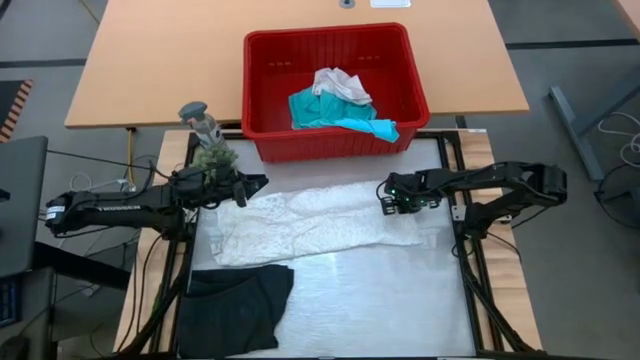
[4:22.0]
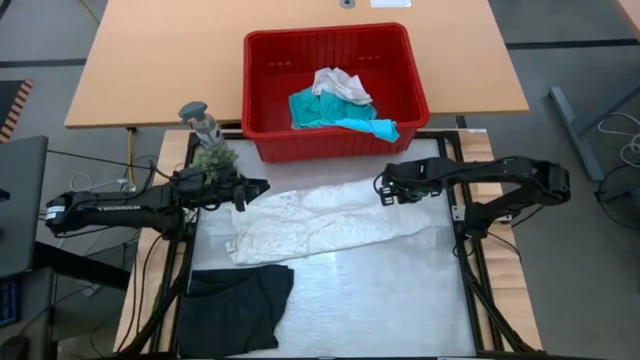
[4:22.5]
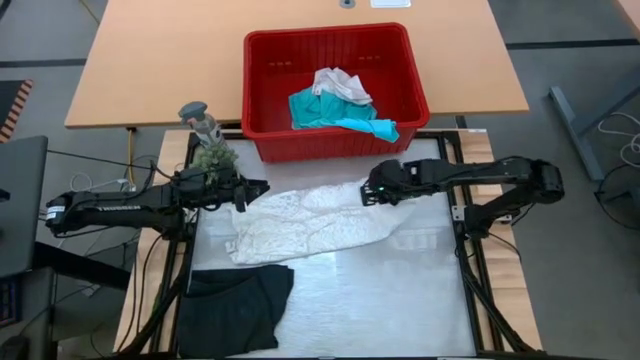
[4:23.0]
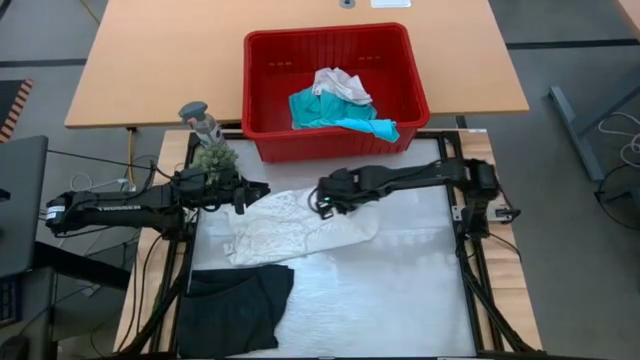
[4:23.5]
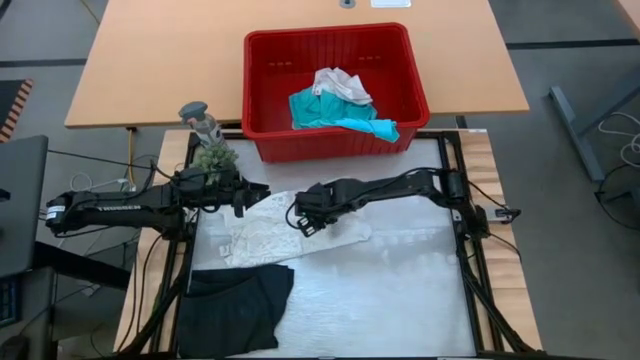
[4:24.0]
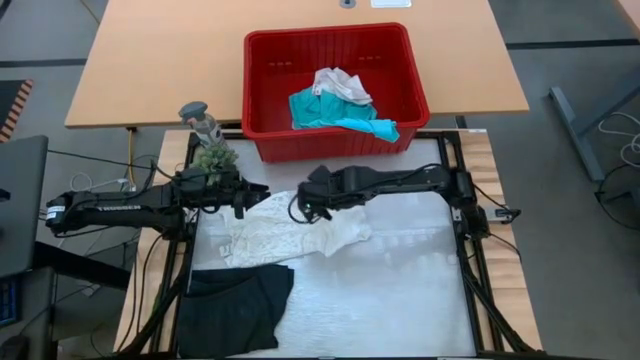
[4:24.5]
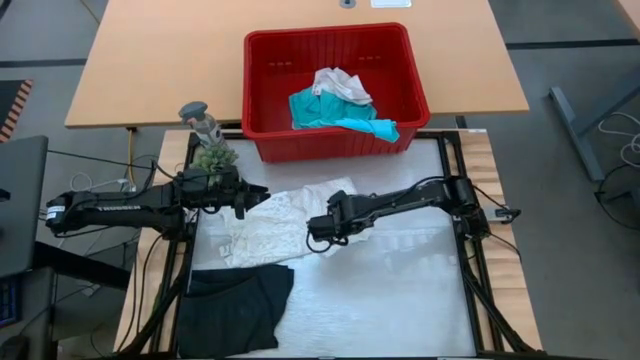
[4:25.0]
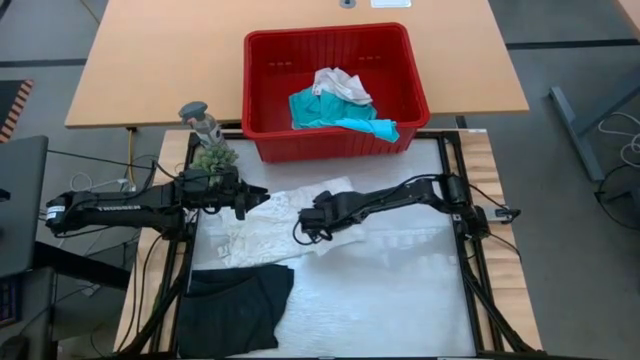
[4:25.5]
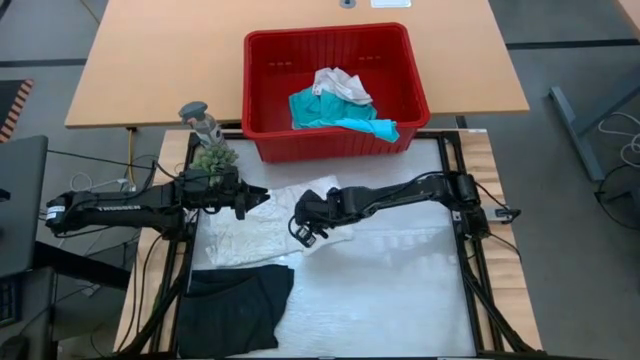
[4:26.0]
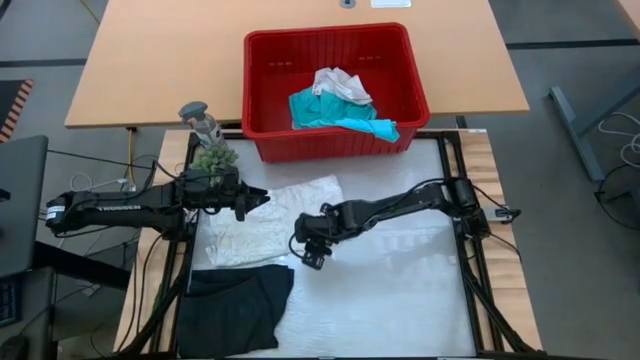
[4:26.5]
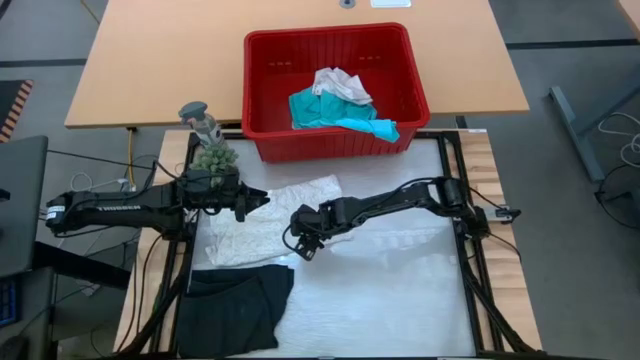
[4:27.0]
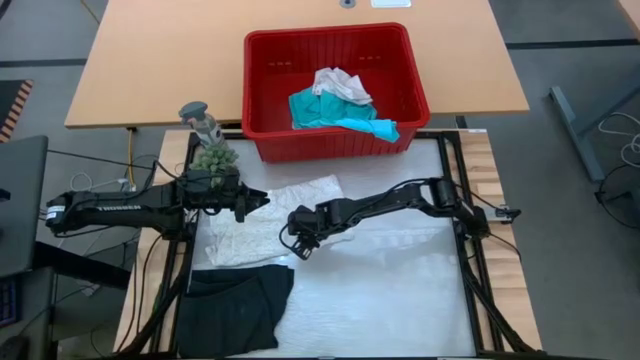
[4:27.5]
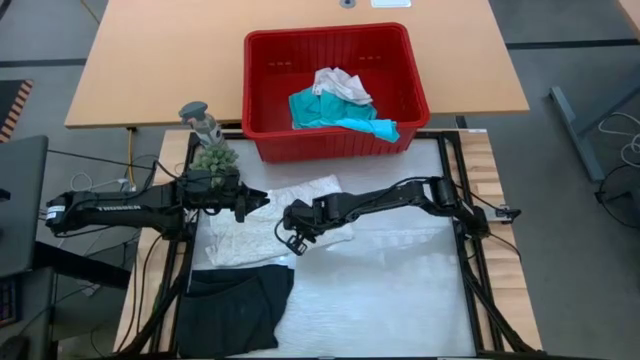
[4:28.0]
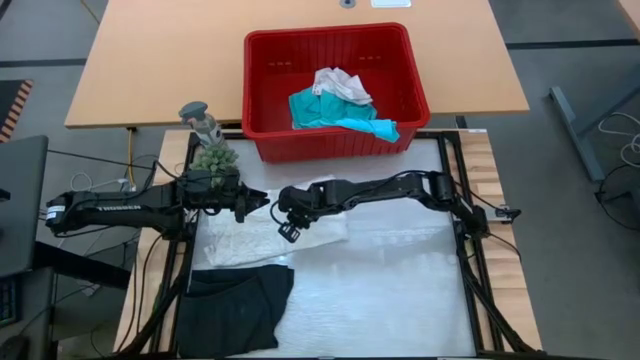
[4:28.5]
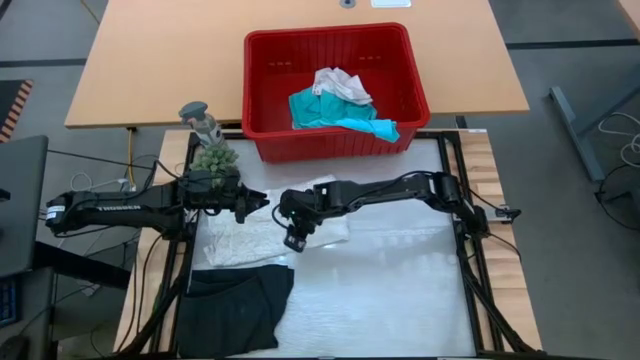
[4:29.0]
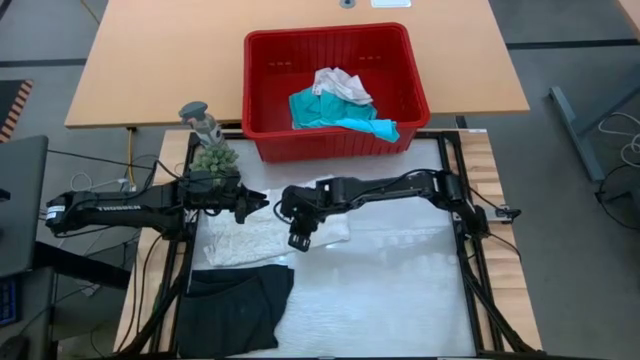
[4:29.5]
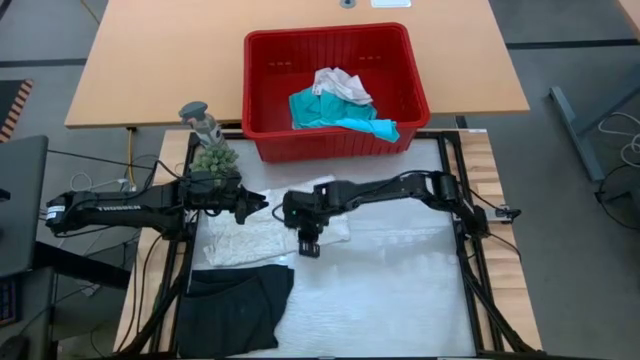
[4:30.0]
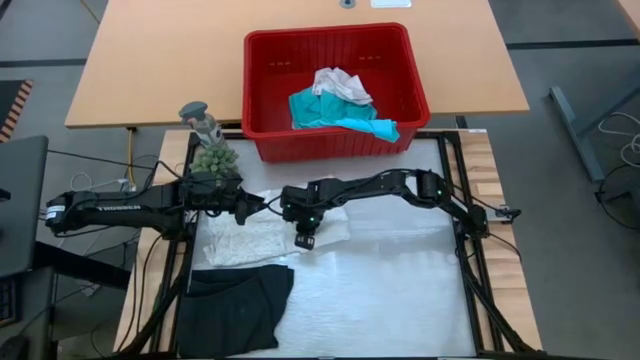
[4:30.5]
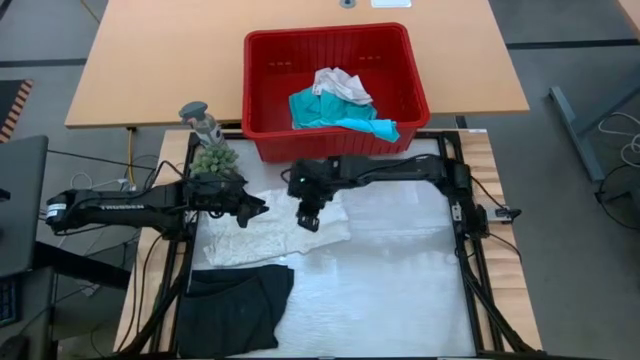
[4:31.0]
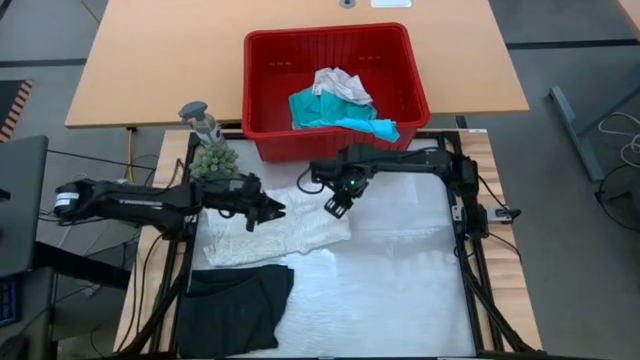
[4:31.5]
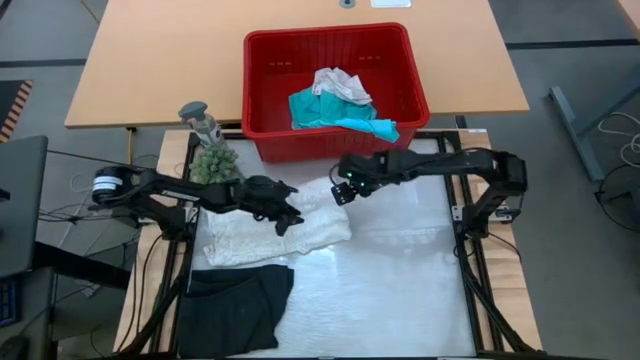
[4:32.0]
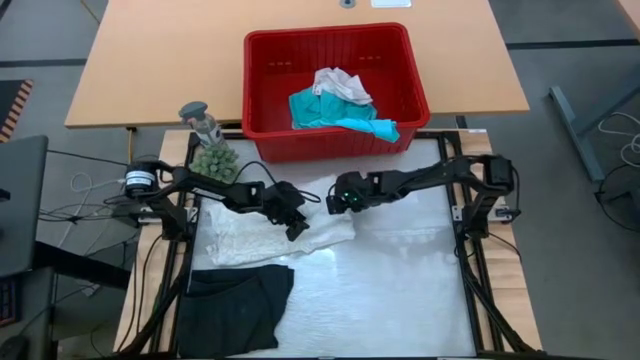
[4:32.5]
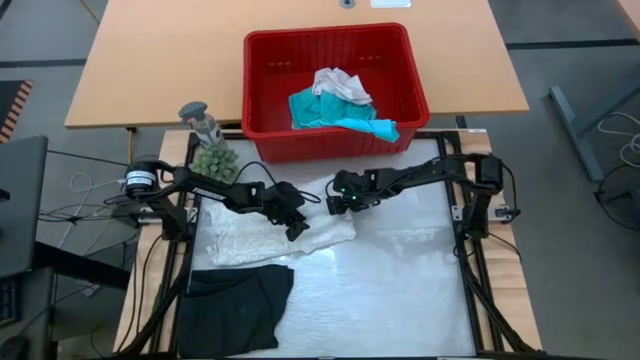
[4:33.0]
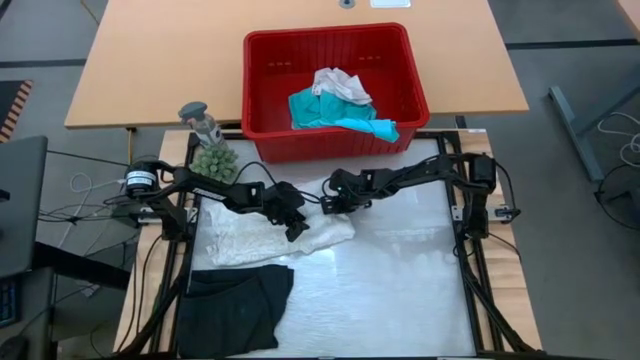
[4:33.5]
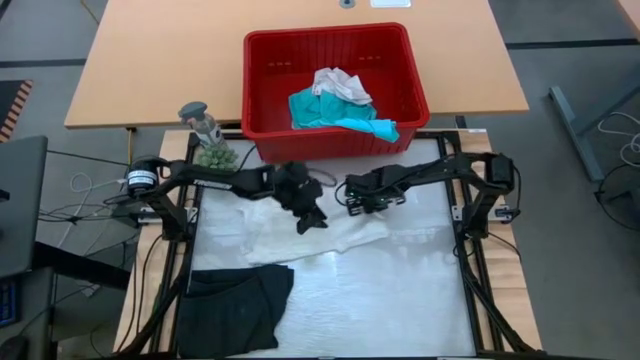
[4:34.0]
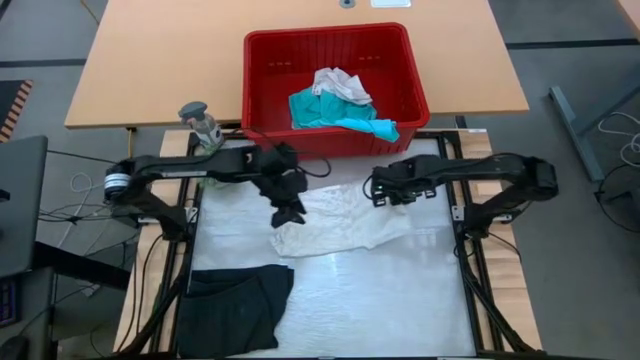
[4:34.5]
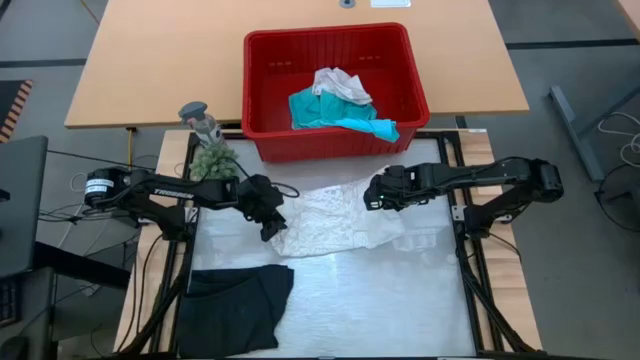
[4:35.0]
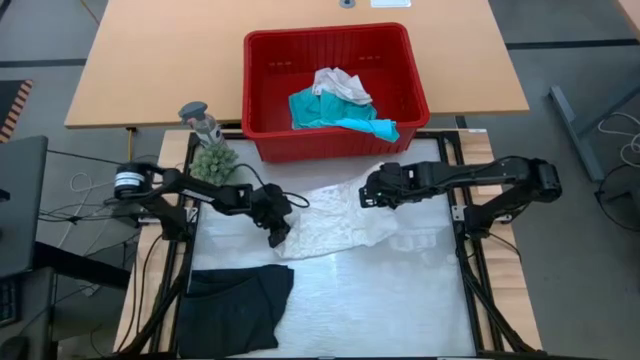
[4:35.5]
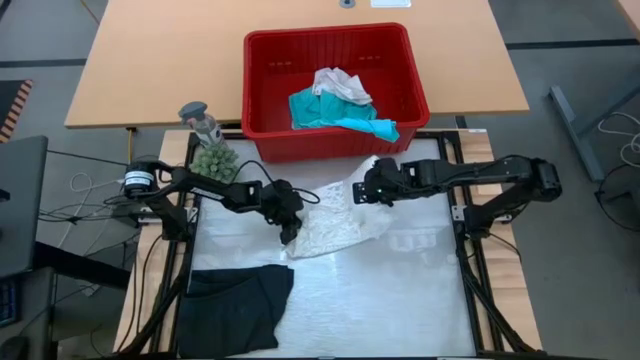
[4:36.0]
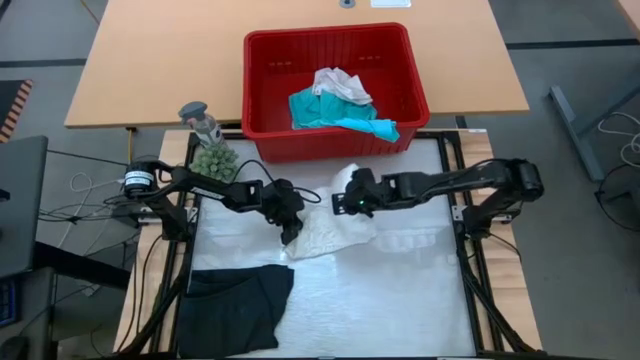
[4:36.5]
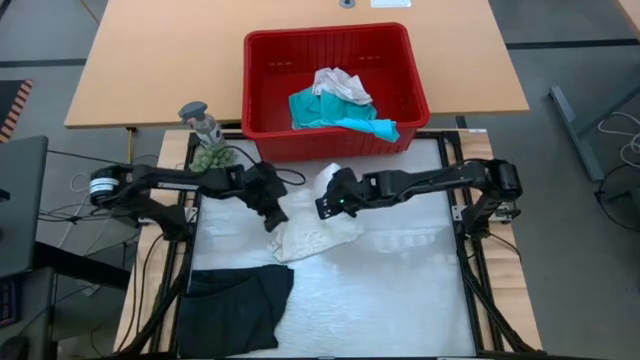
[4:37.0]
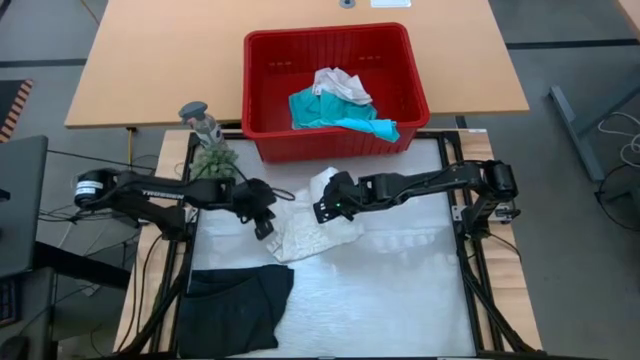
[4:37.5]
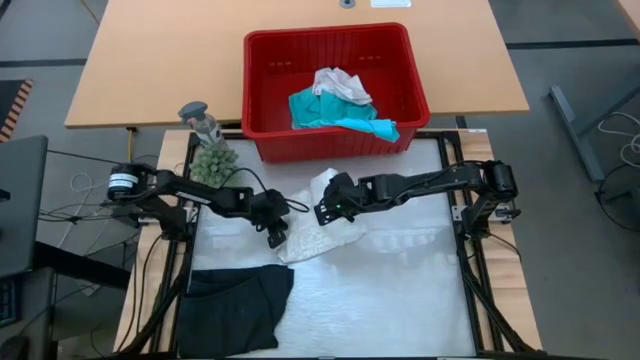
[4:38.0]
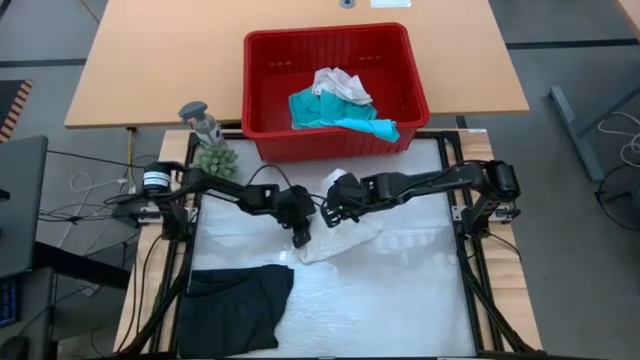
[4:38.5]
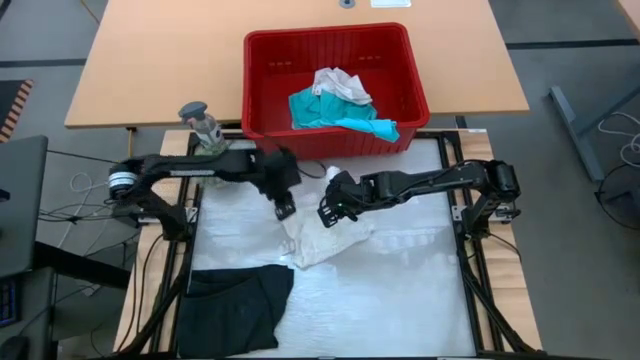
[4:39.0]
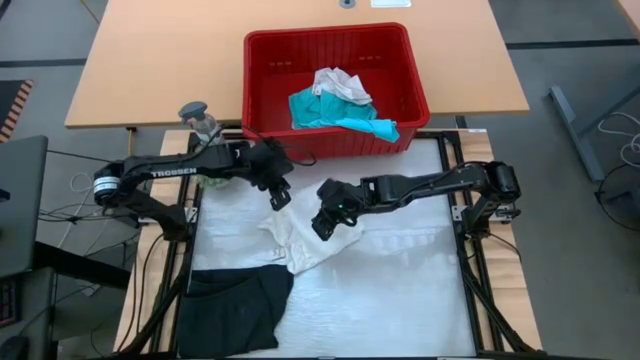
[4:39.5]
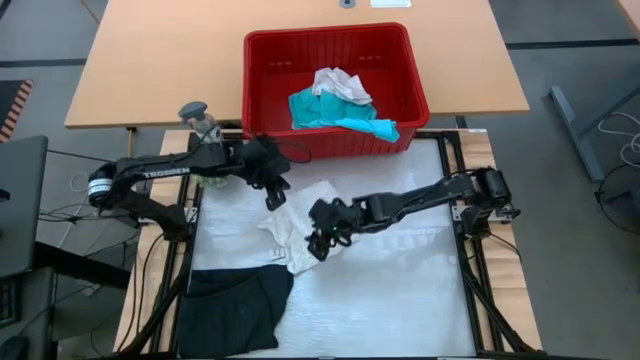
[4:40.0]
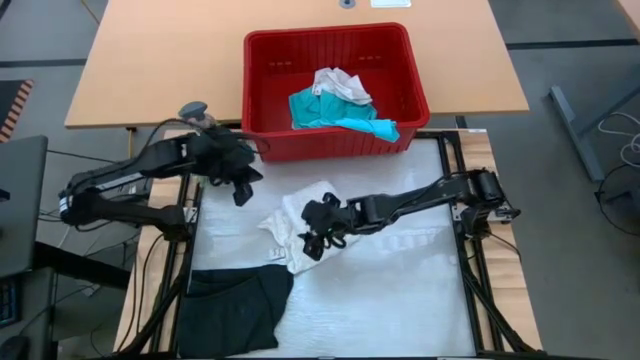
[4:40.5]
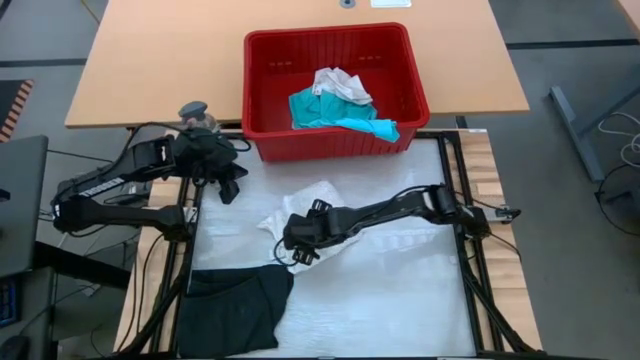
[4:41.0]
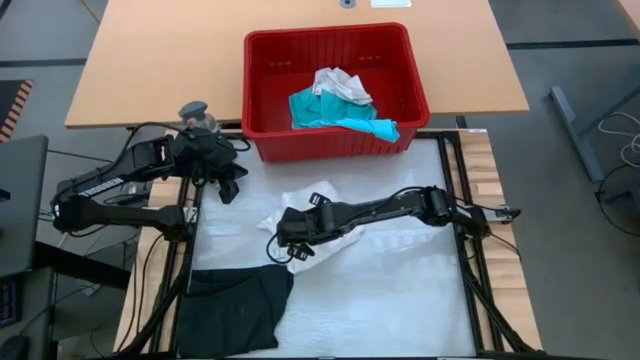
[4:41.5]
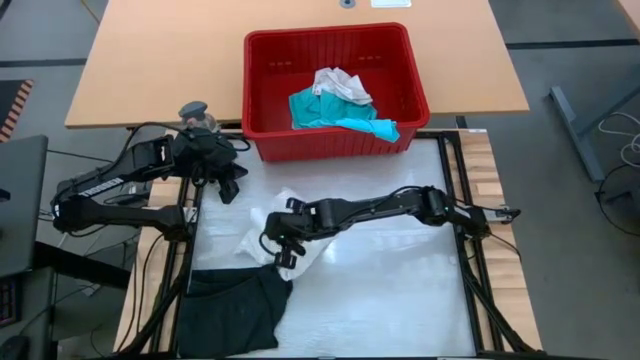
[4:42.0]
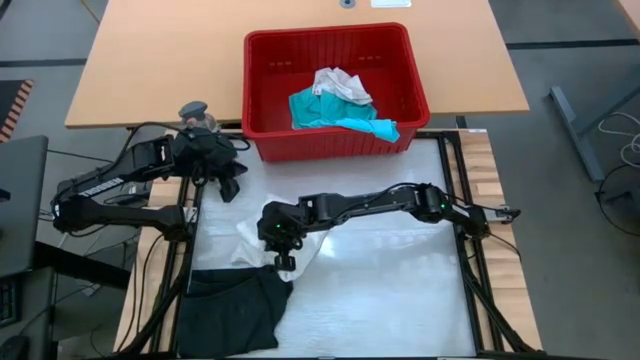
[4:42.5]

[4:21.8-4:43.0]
Task: Fold Laundry from Bin
Fold the white dress
